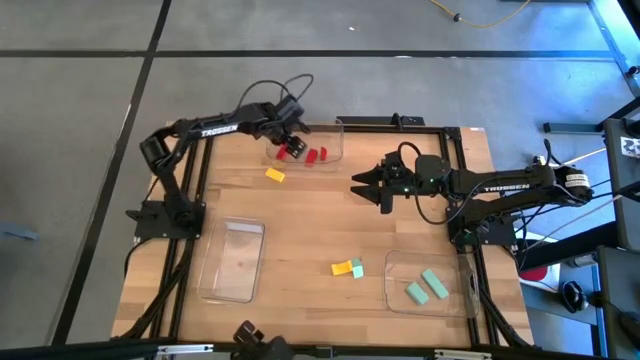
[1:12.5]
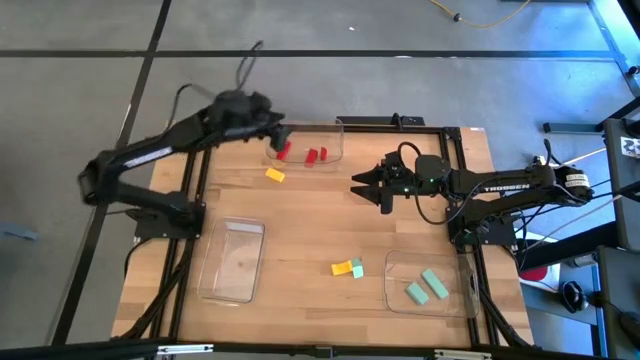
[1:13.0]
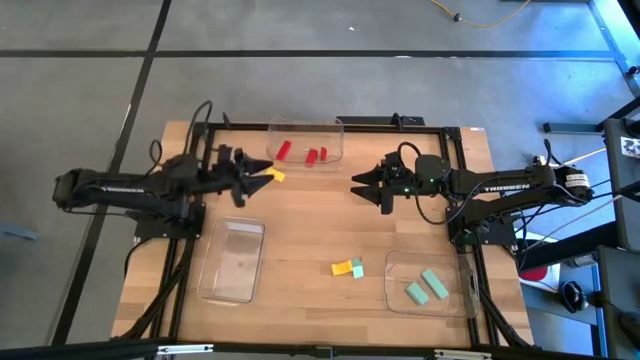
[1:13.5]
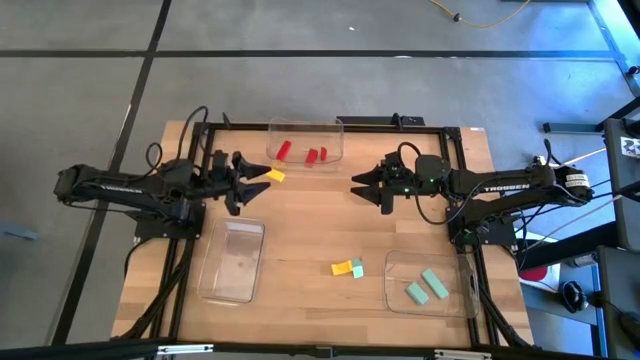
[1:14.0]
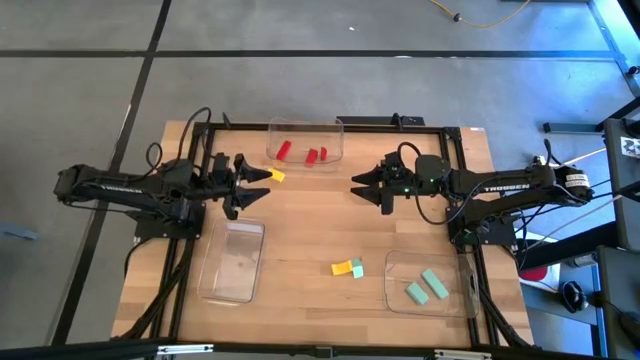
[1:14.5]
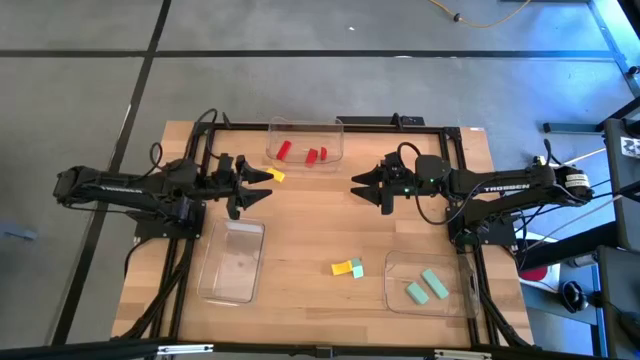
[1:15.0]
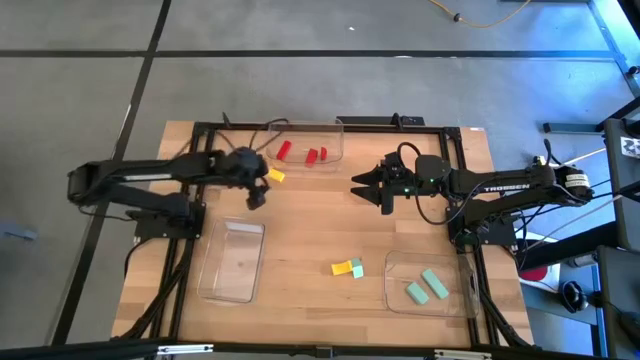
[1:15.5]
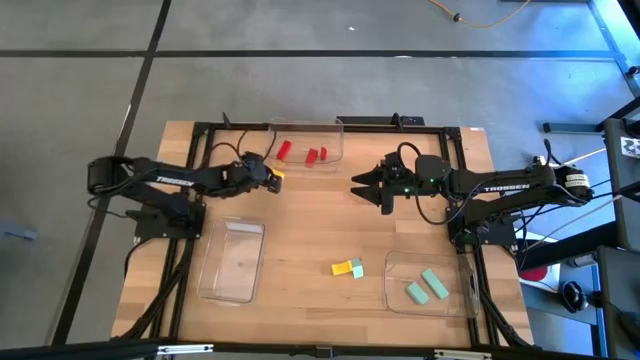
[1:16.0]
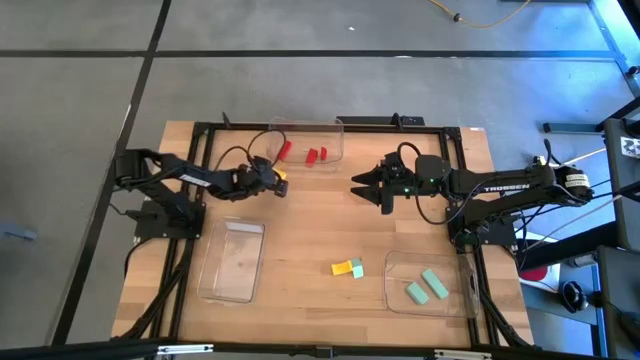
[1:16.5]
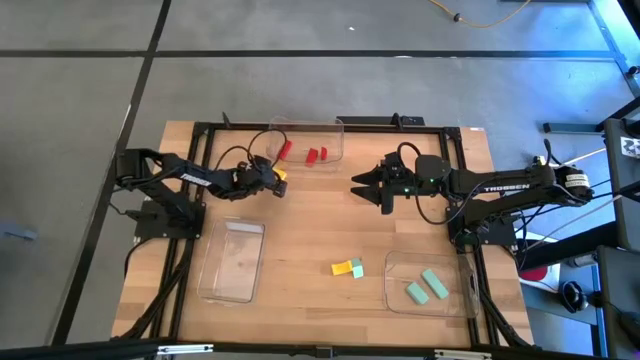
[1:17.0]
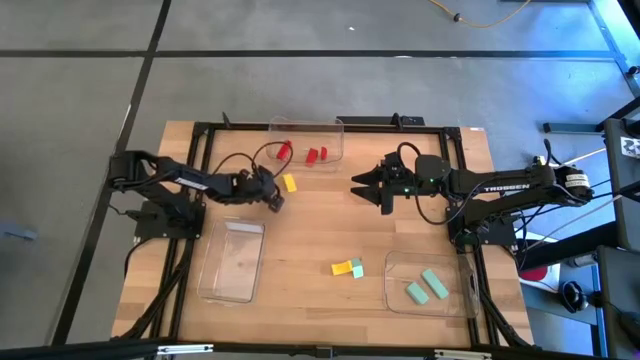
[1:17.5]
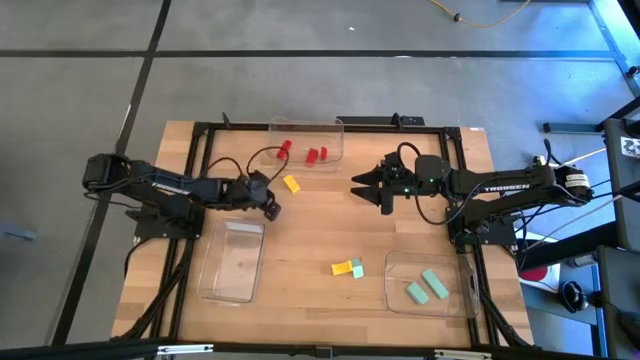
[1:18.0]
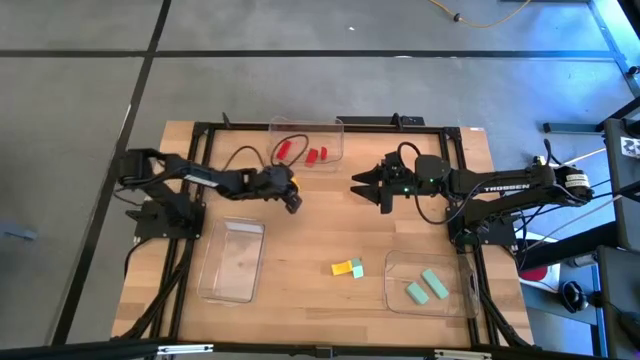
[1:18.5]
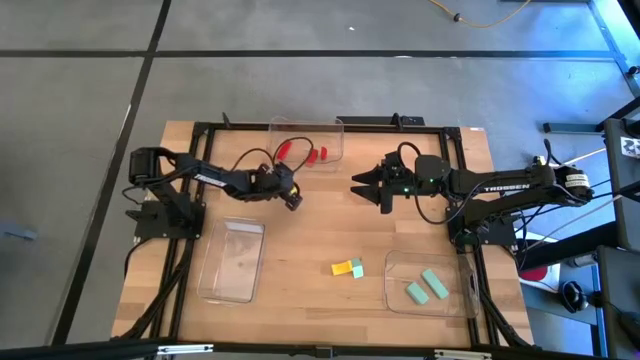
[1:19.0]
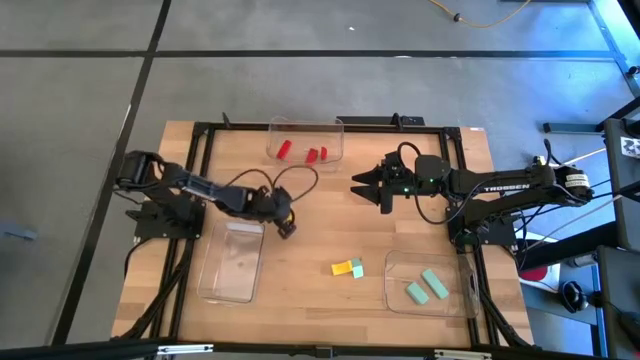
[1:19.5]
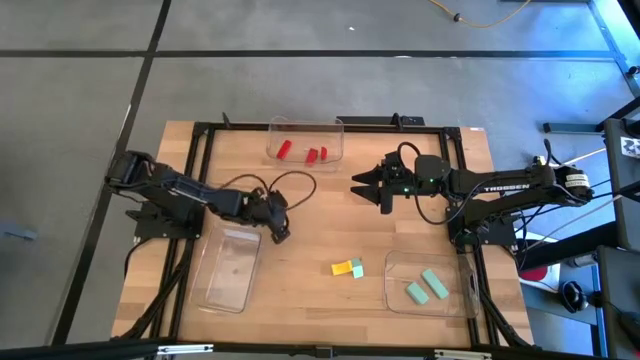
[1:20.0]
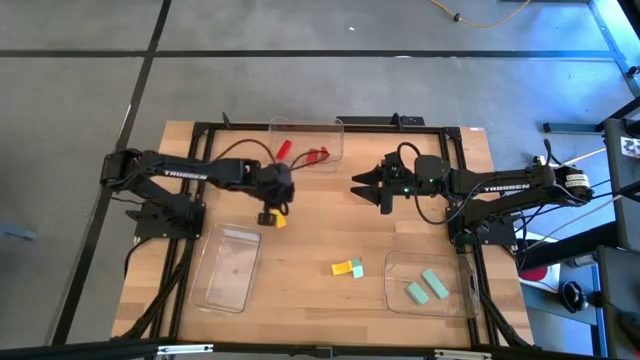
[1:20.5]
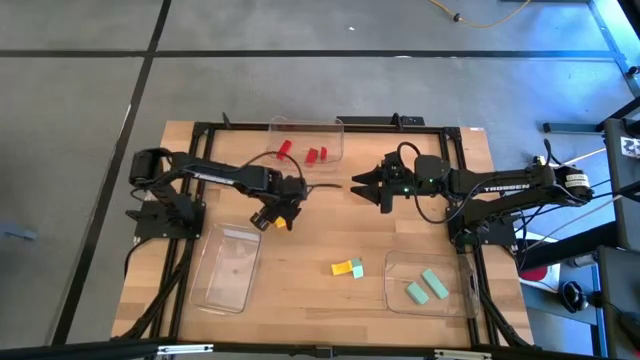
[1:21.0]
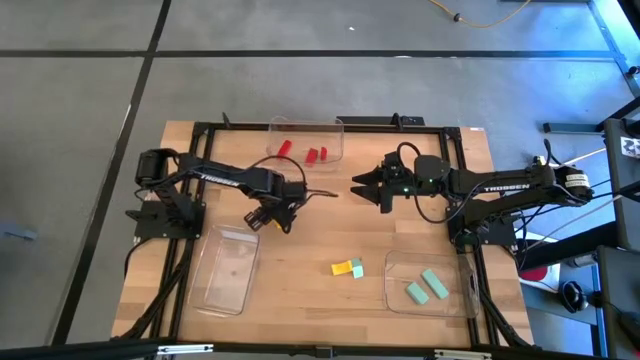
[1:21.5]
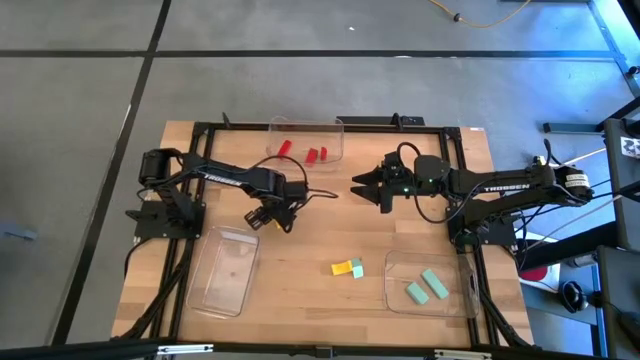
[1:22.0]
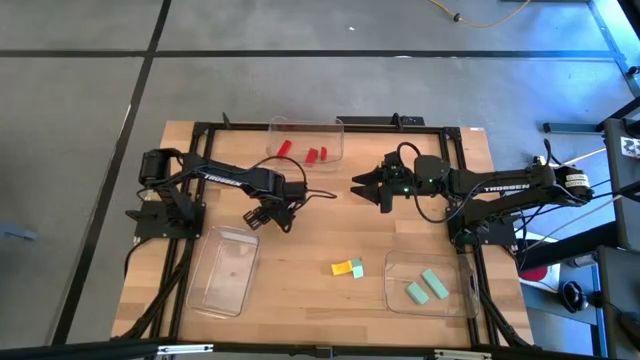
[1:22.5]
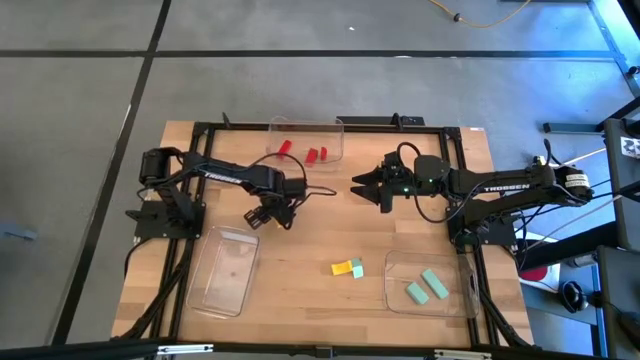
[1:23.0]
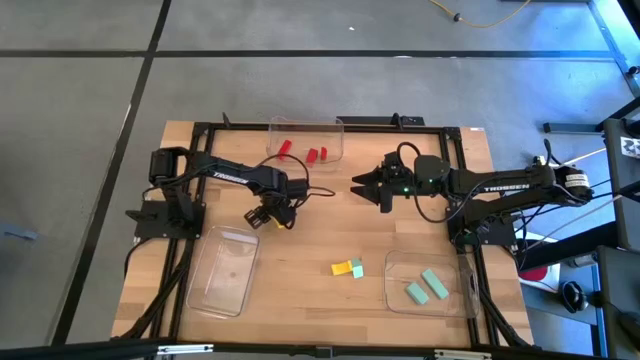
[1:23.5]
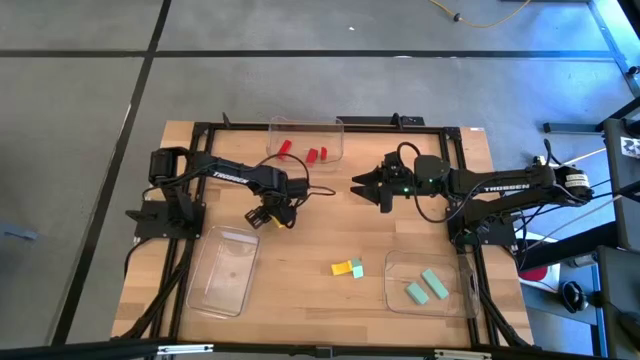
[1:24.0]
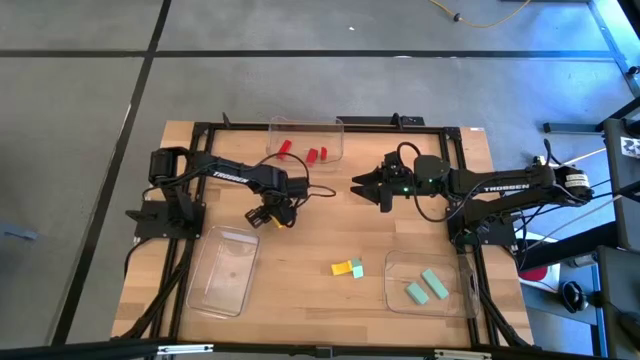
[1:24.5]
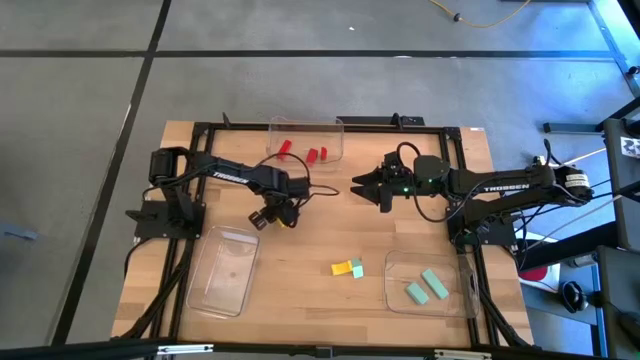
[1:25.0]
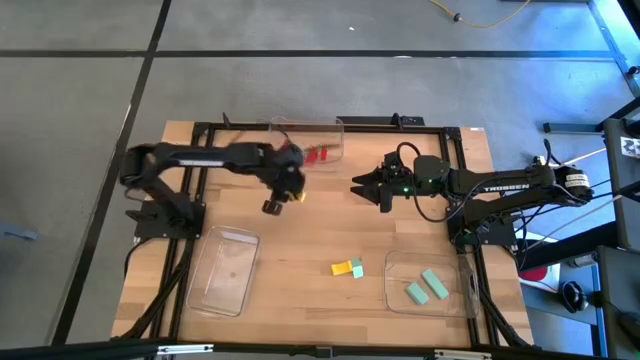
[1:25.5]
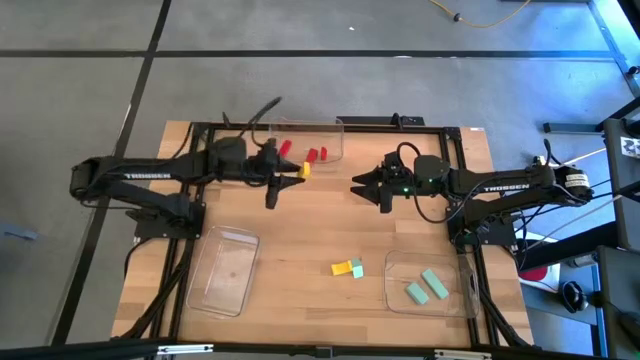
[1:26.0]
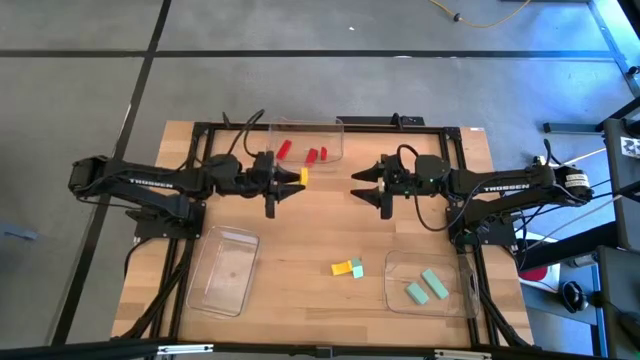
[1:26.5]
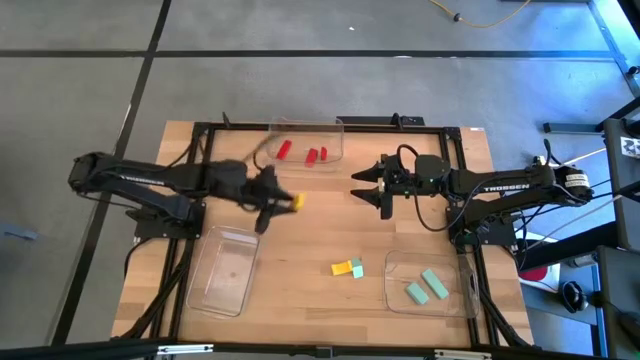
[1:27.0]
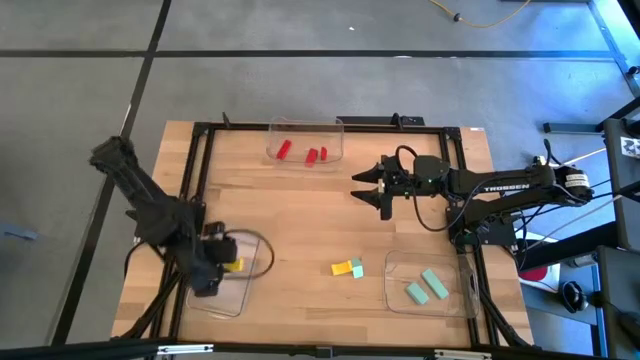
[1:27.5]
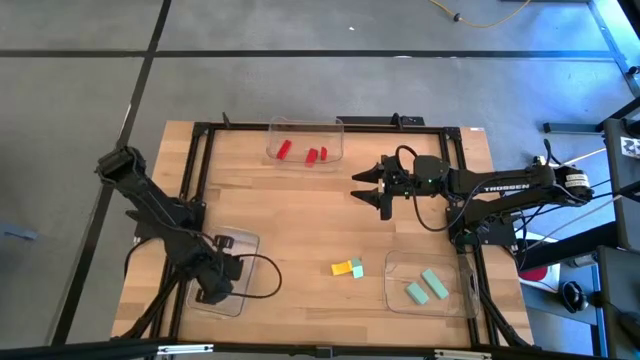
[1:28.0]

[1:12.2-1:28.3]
Task: Sort & place blocks by color
Put the top left yellow block in the left transparent bin
